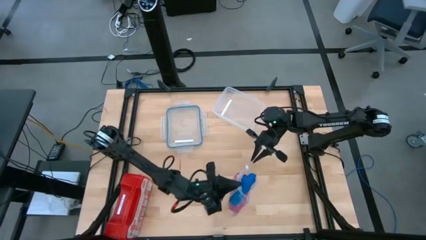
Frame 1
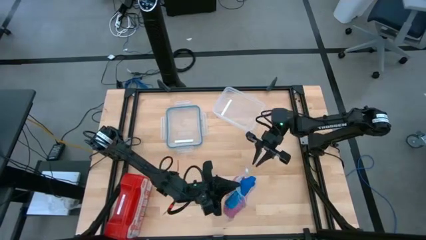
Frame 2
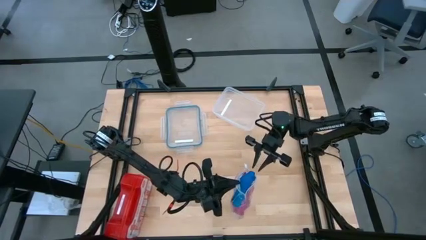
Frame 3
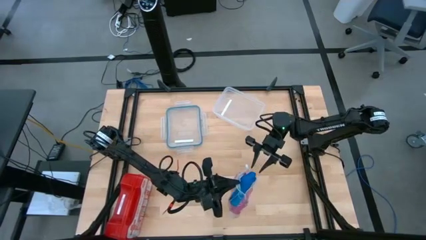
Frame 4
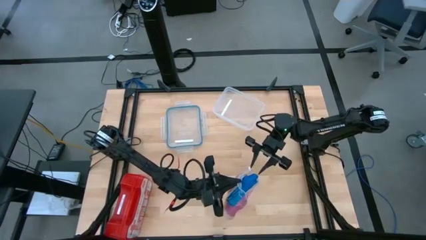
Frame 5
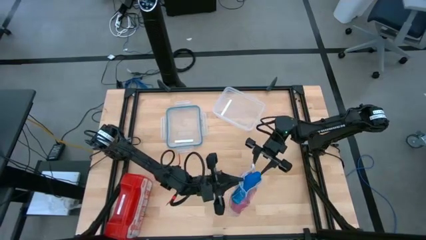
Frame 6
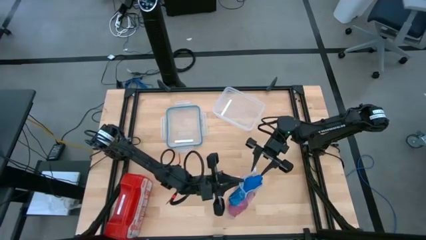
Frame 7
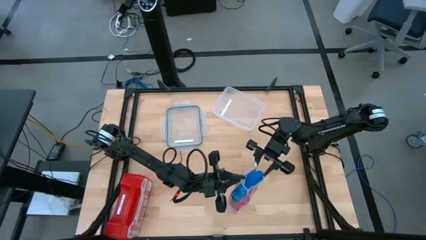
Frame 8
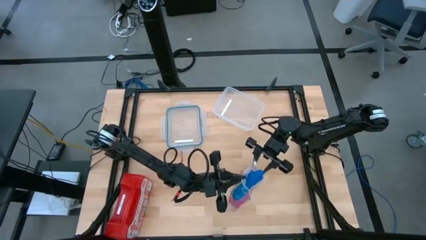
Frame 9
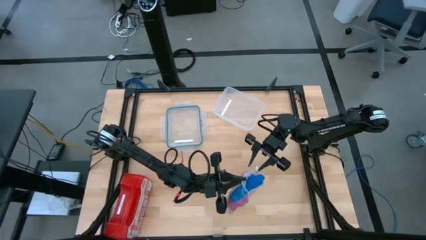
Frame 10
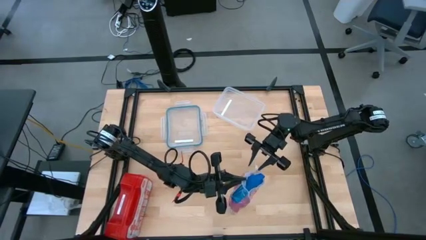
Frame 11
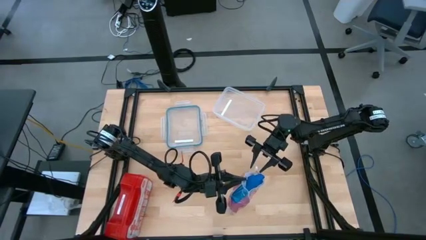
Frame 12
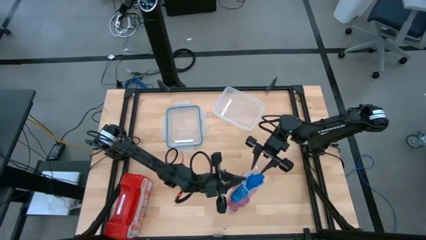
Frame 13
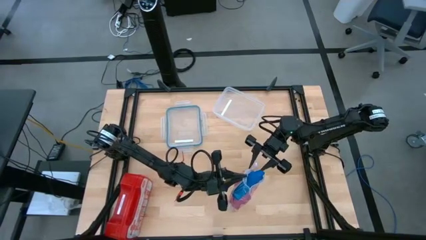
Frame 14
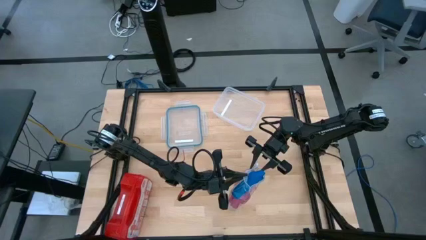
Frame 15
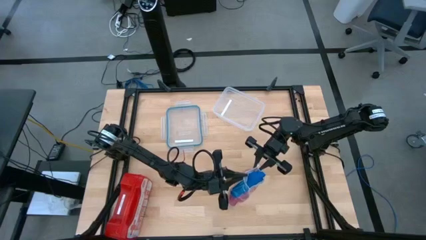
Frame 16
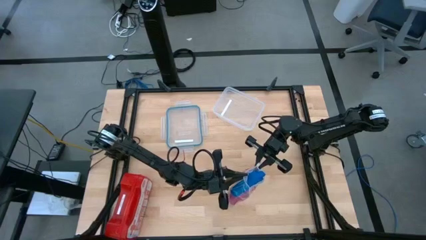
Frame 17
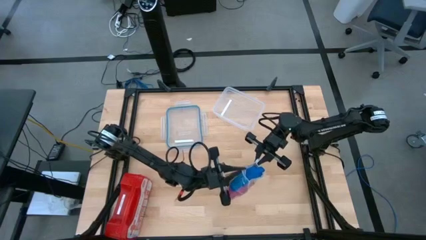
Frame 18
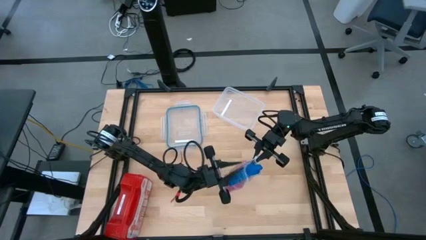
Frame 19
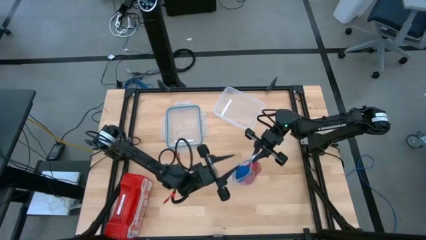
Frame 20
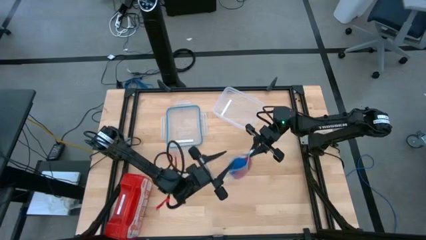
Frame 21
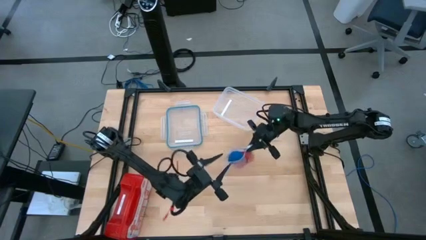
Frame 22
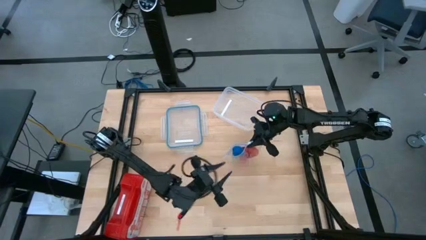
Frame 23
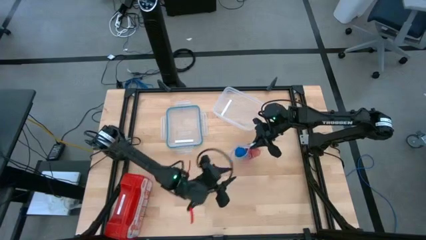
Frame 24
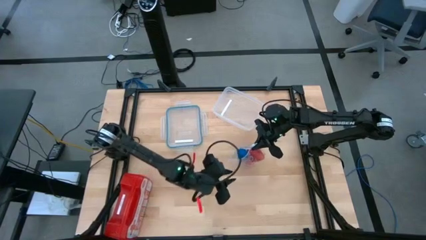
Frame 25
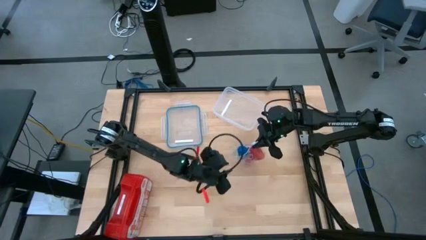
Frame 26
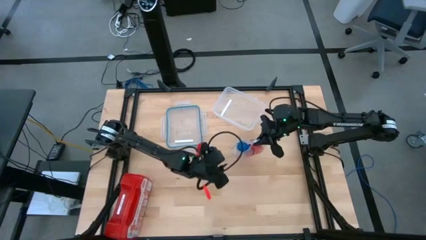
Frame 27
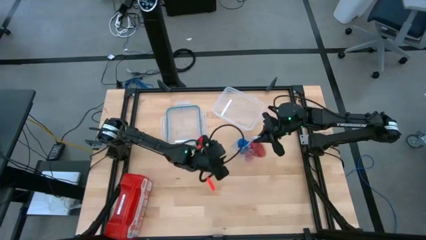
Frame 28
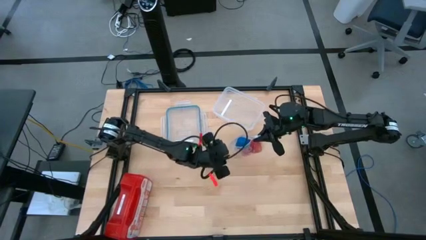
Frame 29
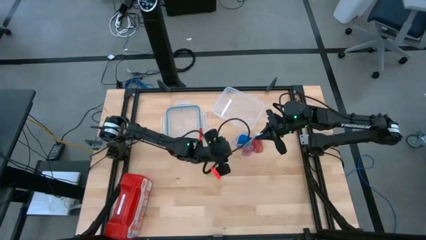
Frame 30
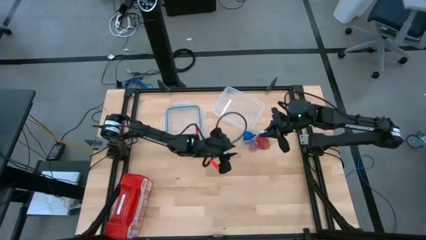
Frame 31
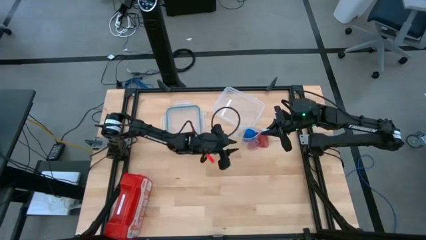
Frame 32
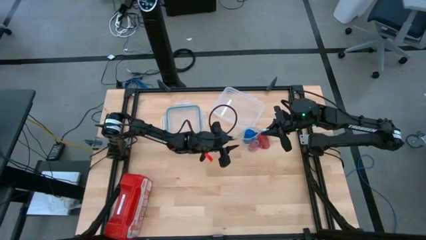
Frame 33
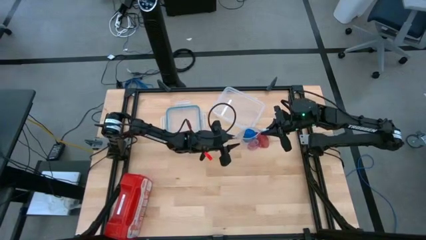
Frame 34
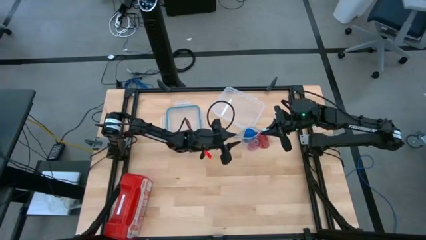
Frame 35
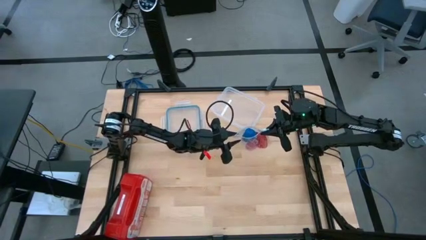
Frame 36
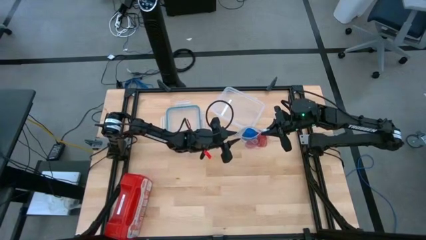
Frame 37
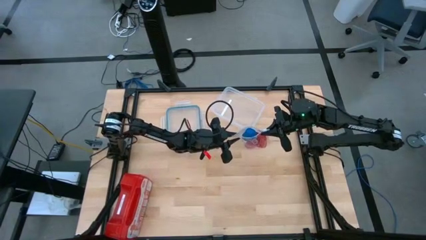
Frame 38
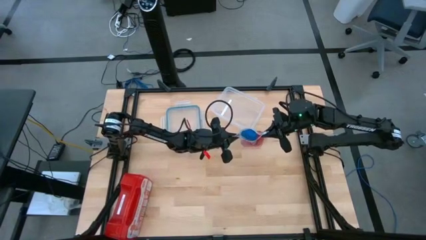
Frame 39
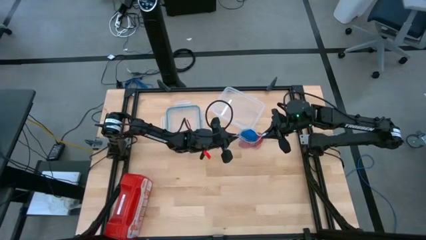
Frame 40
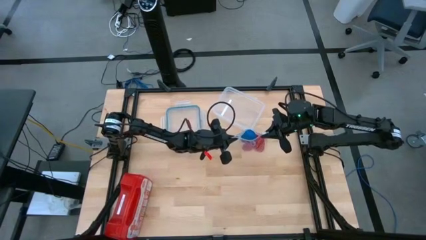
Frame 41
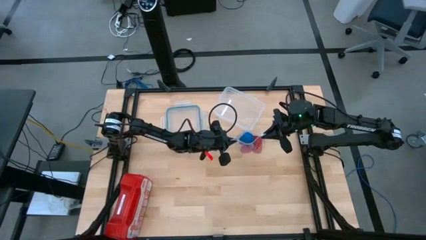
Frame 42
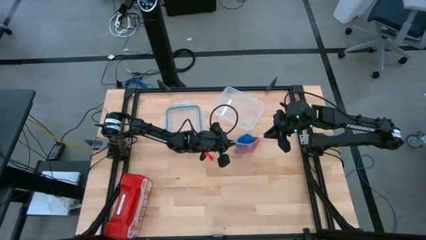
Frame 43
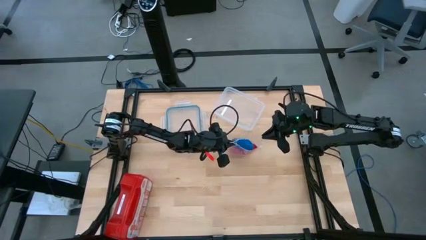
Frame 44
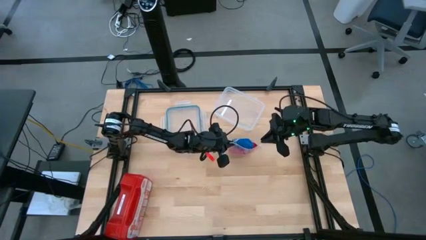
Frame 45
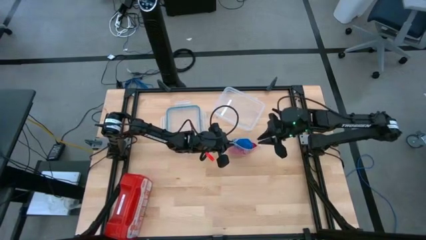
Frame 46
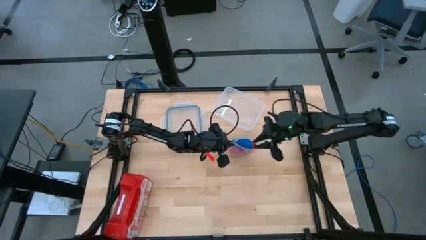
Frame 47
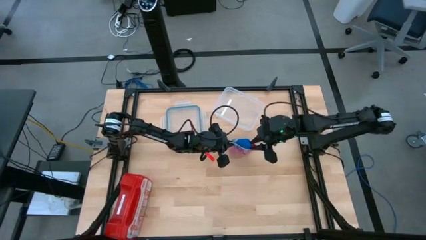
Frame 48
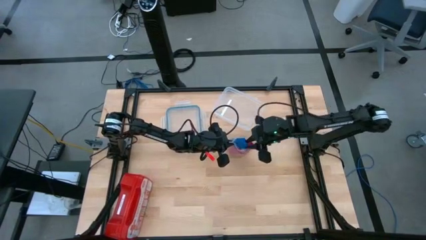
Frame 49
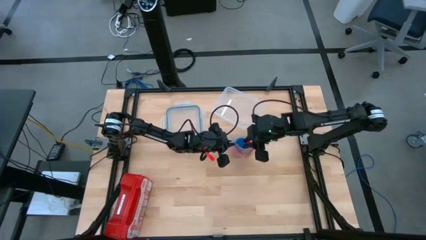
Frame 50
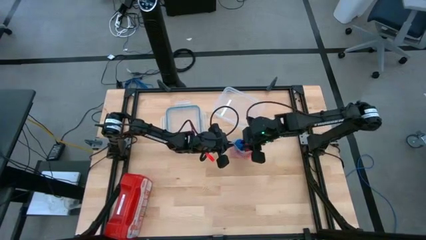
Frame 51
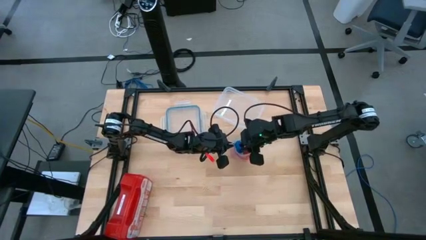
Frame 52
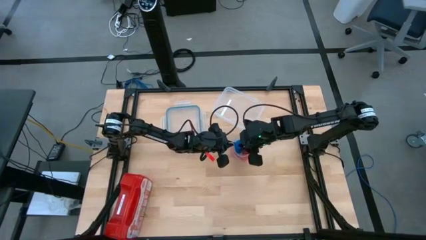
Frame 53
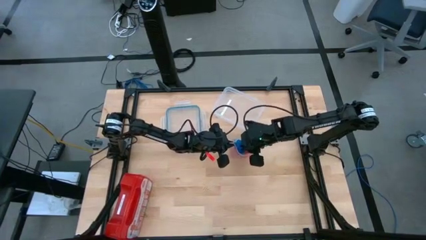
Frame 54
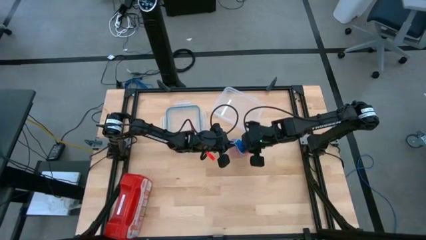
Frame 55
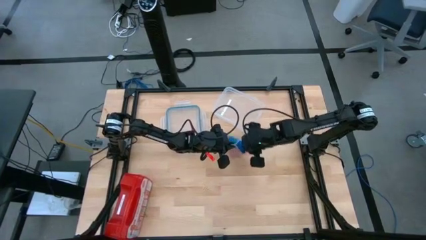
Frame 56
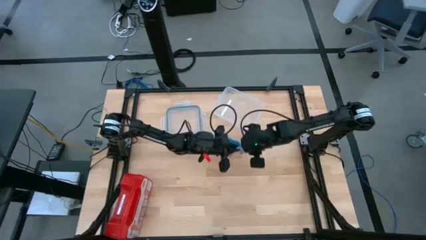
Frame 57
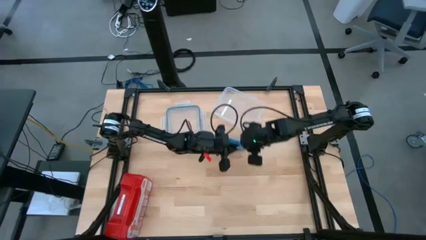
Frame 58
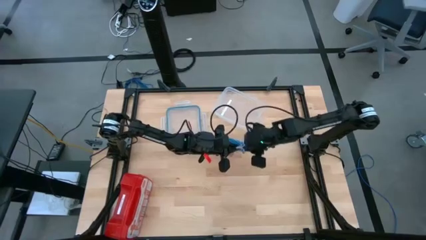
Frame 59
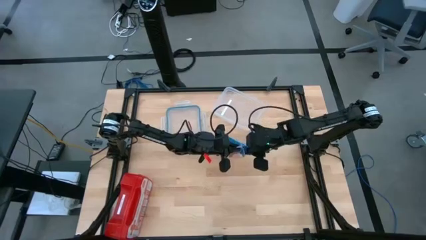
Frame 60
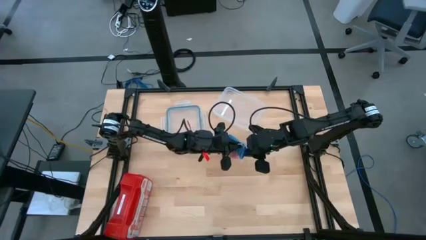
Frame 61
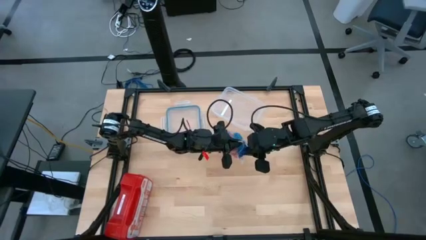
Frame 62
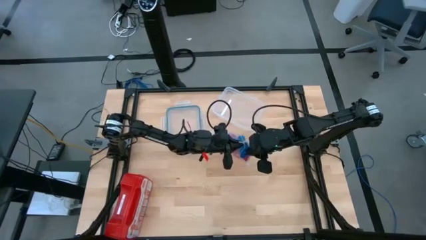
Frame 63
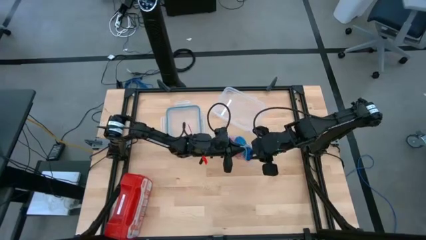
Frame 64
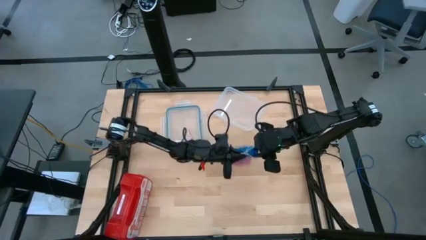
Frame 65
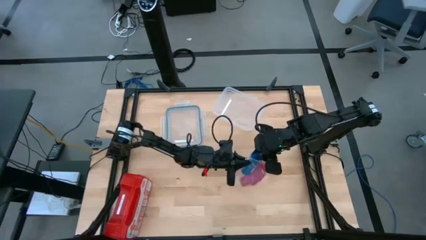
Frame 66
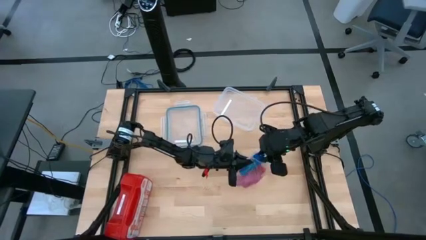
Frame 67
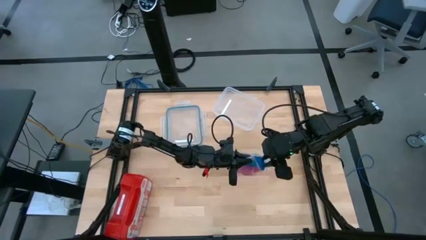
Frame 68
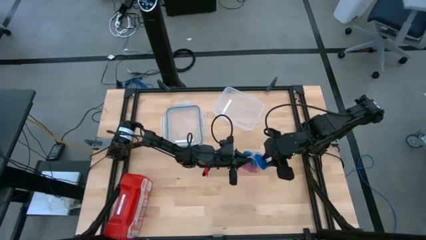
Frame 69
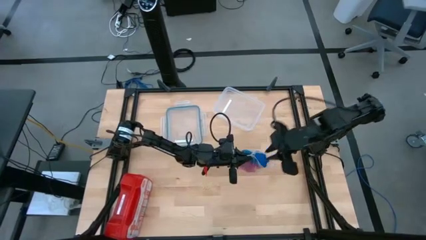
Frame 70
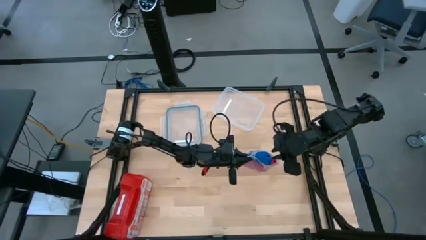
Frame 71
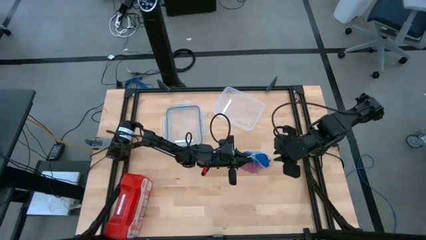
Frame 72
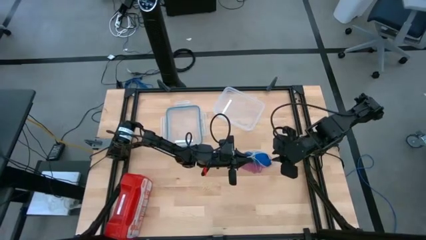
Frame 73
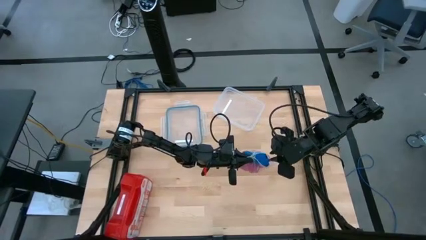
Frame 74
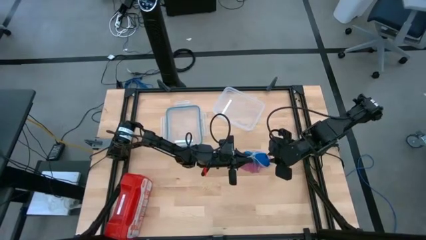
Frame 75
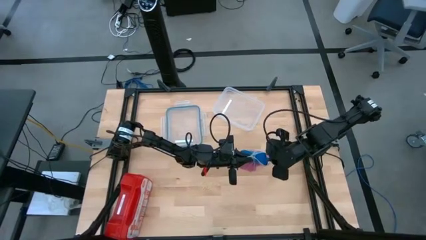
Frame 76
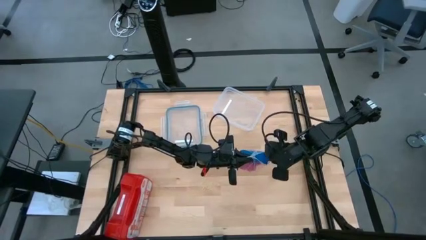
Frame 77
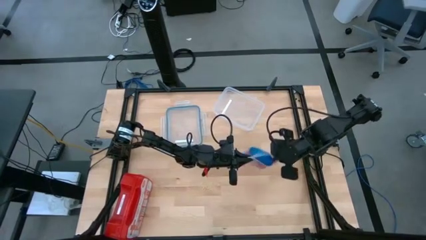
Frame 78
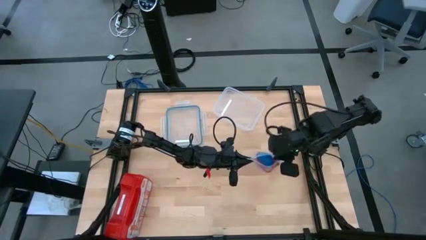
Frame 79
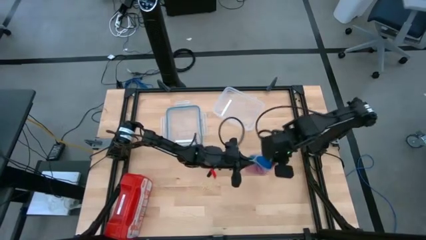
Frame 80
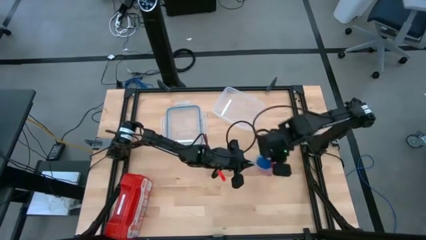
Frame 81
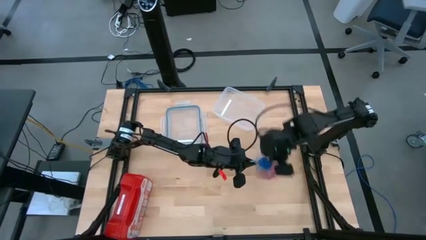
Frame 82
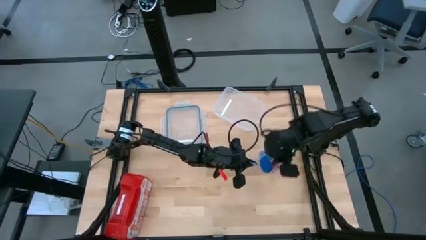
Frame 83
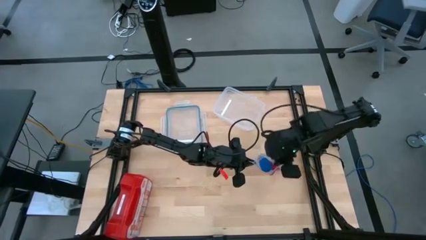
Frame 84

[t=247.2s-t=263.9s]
Task: Roll bandage
Put the blue bandage into the transparent zip bag
